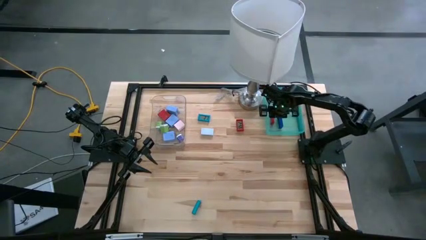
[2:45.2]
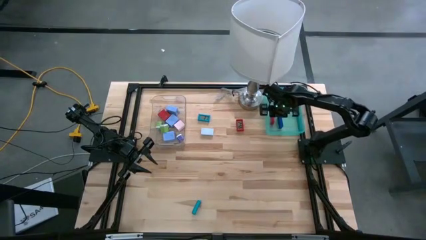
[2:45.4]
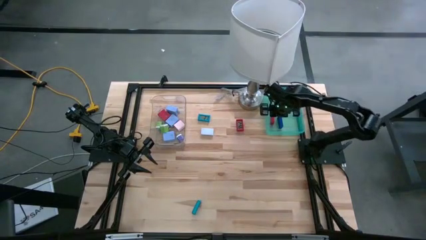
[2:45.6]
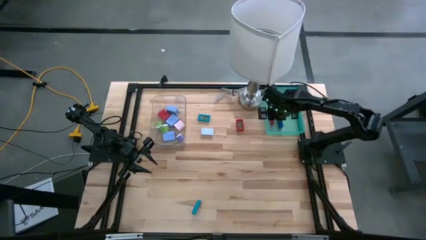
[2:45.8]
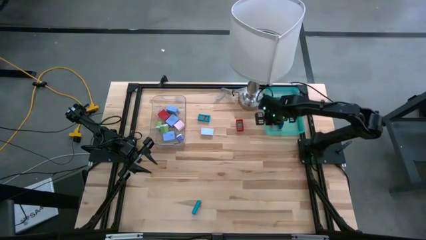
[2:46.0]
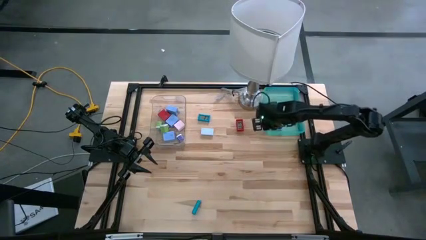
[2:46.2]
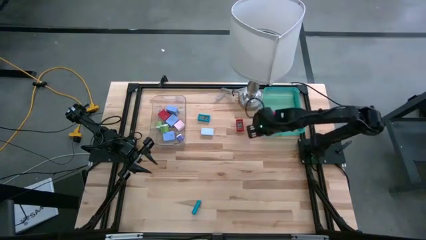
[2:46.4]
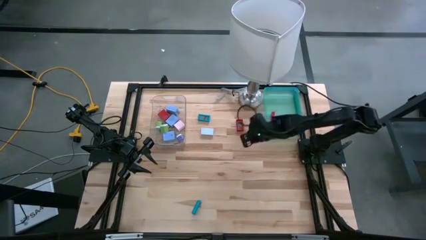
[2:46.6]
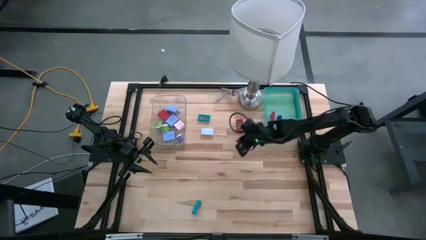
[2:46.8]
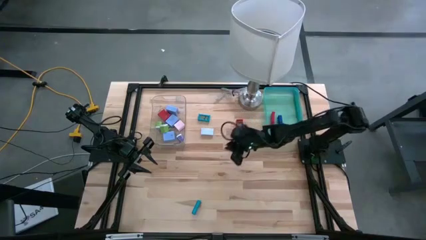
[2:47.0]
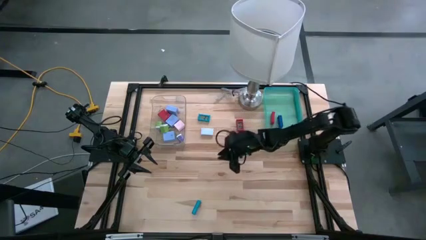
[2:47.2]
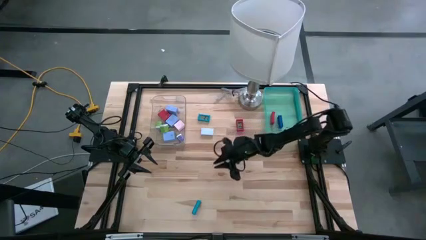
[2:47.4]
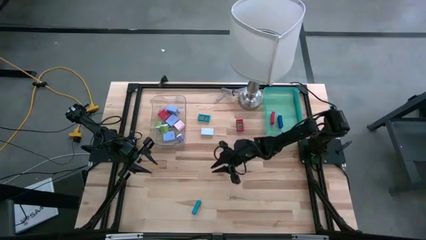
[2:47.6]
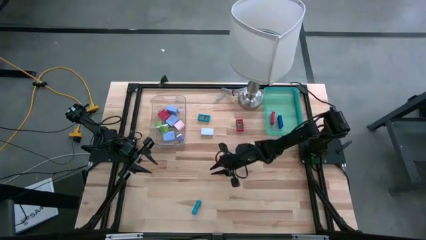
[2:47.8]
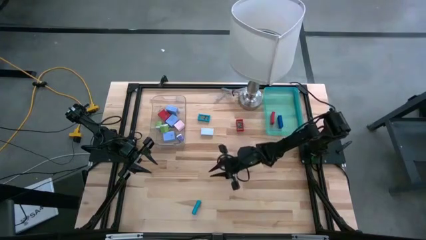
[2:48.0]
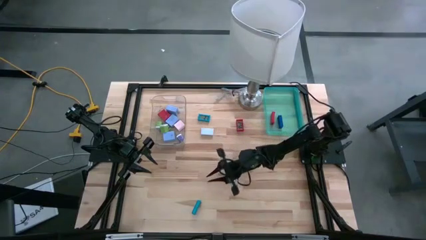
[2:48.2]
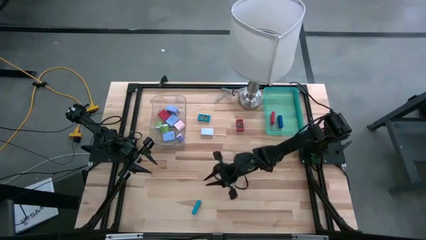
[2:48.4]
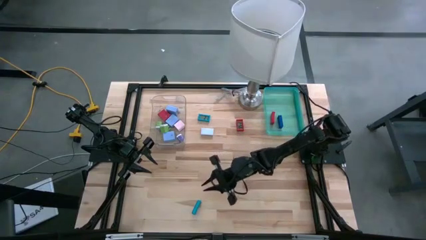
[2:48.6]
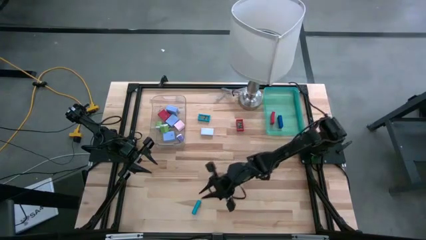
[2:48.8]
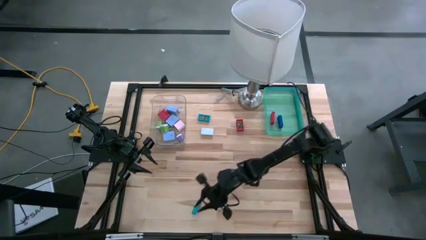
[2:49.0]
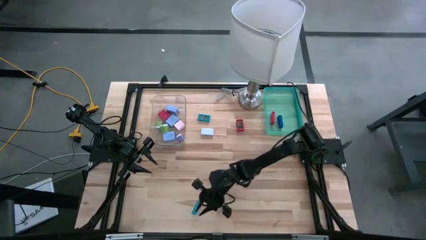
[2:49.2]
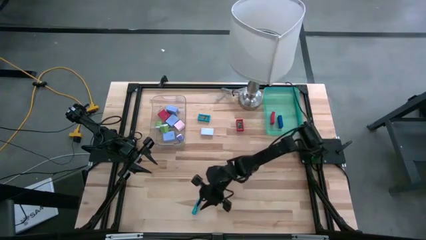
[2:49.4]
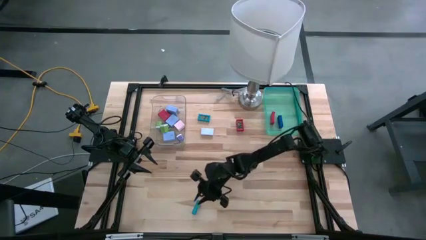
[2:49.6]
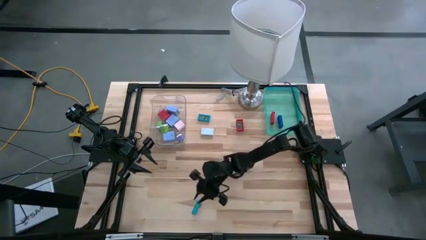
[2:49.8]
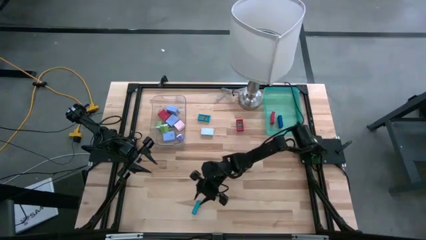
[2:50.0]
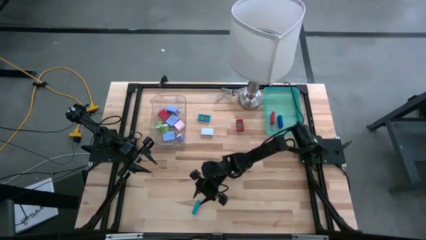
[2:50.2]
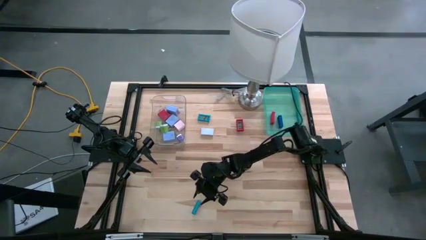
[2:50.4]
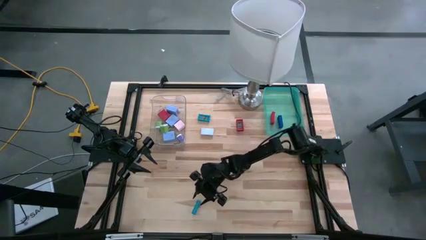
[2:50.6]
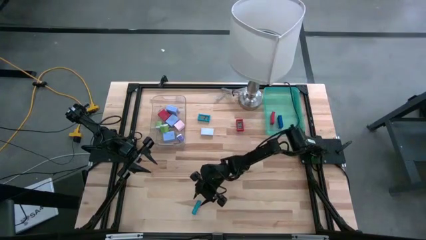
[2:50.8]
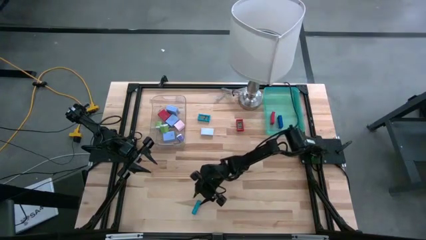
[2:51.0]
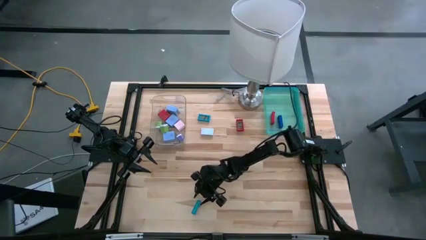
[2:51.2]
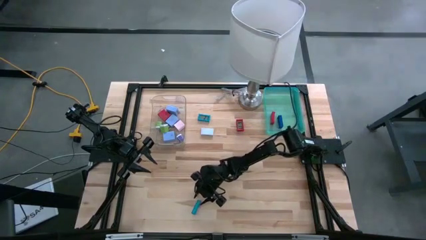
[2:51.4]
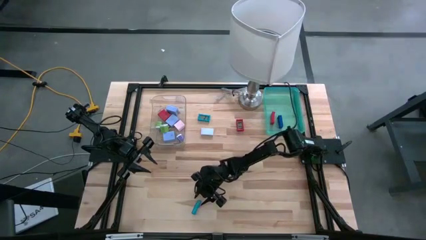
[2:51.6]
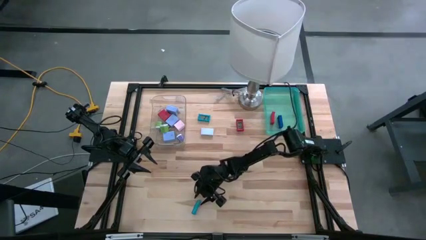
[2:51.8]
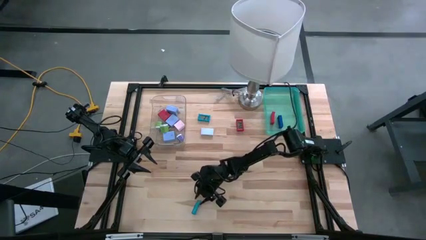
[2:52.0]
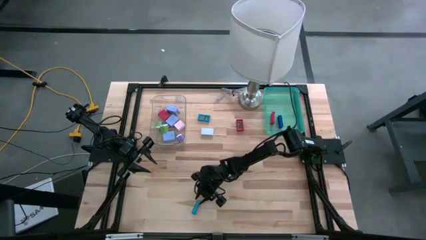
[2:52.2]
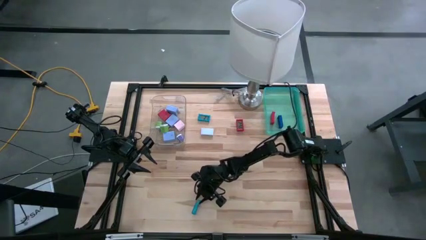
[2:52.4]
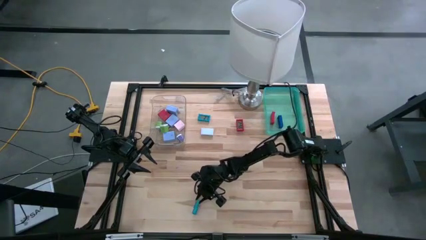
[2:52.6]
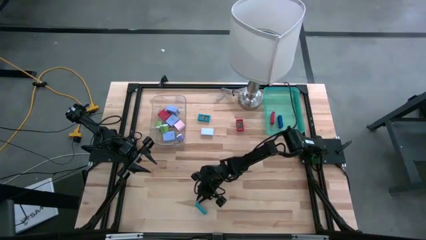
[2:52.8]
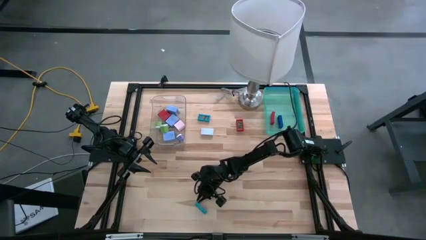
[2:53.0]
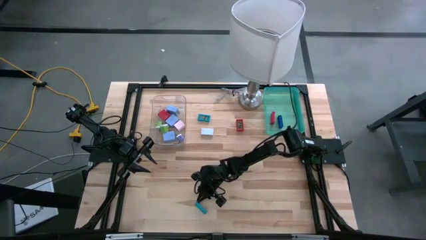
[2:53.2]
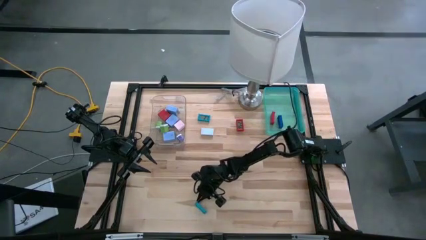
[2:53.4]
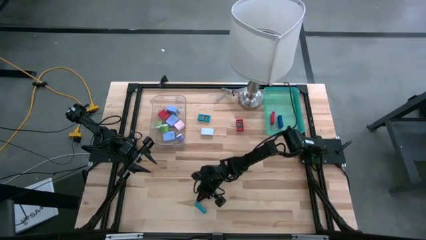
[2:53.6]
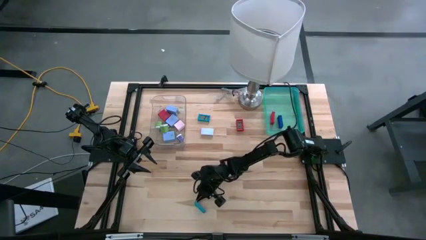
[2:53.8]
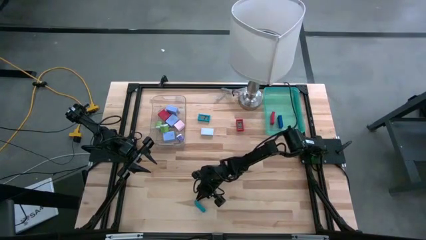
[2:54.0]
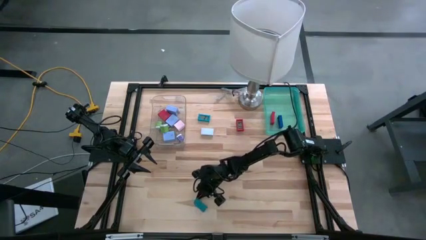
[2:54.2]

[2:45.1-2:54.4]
Task: Pick & Place Office items
Put the bottom light blue mini digital clock into the light blue bin

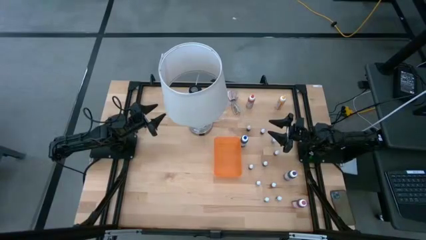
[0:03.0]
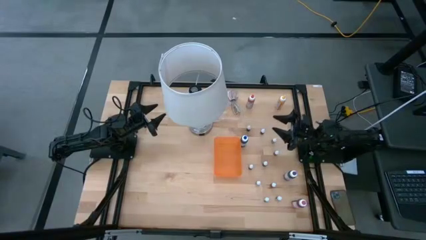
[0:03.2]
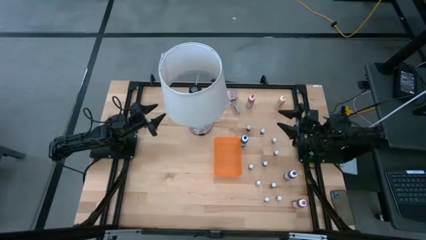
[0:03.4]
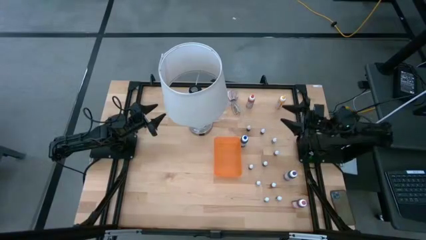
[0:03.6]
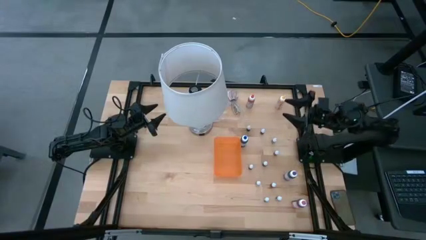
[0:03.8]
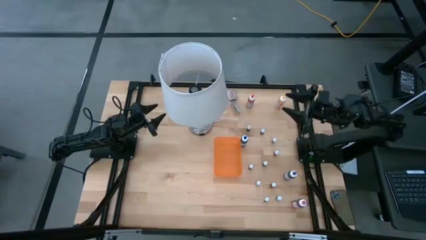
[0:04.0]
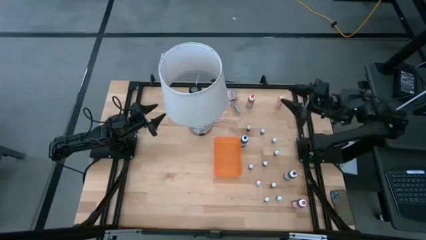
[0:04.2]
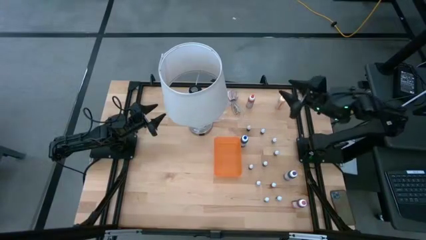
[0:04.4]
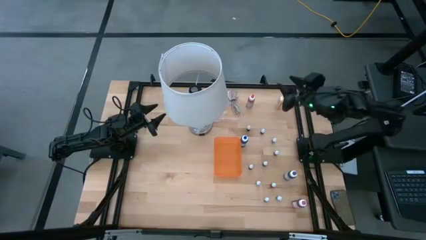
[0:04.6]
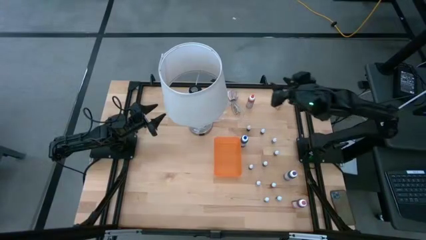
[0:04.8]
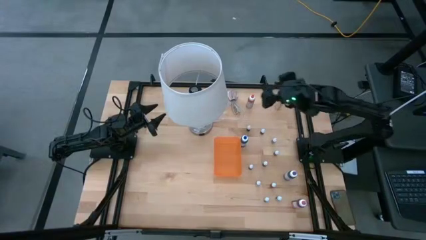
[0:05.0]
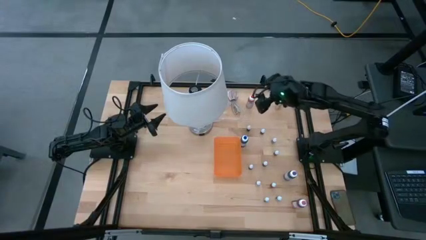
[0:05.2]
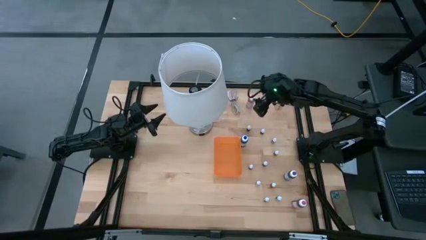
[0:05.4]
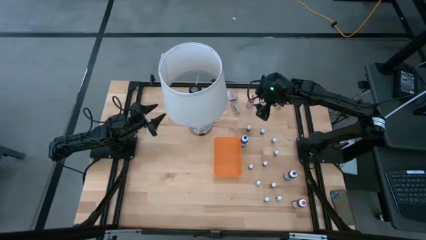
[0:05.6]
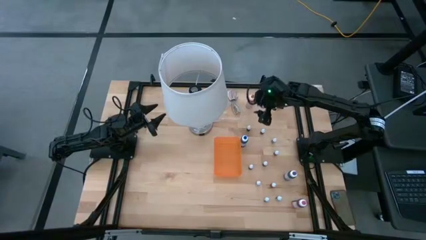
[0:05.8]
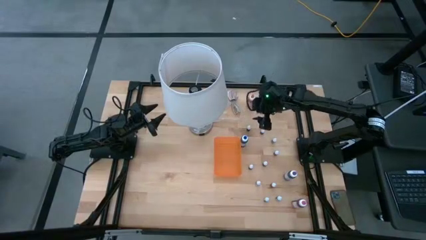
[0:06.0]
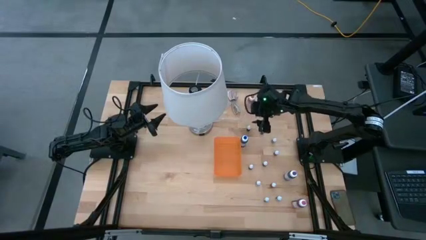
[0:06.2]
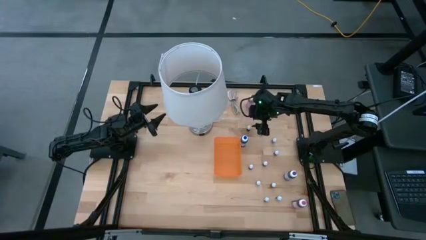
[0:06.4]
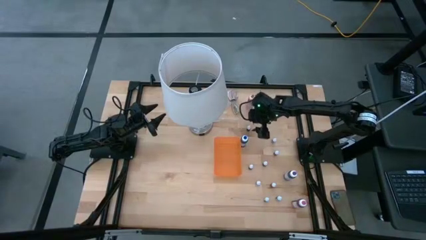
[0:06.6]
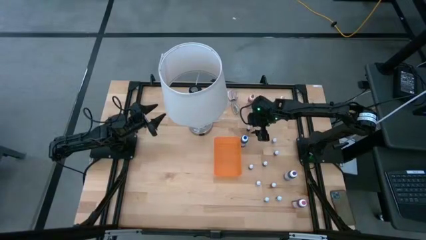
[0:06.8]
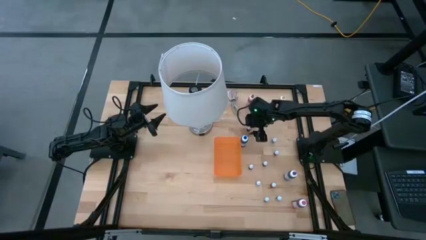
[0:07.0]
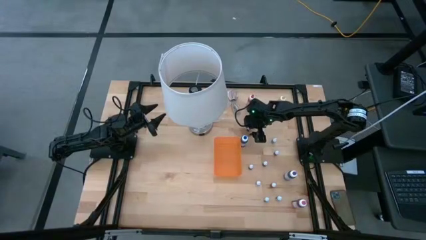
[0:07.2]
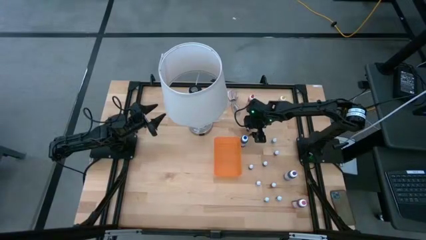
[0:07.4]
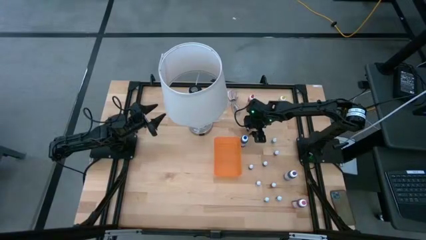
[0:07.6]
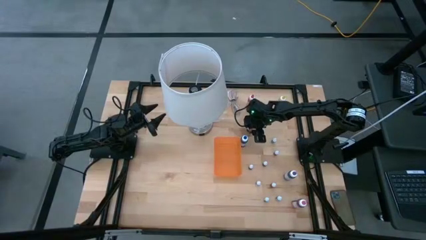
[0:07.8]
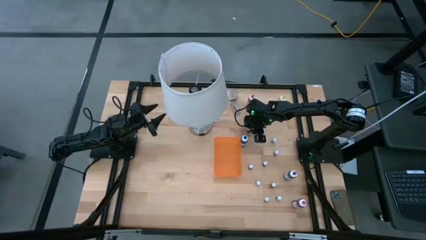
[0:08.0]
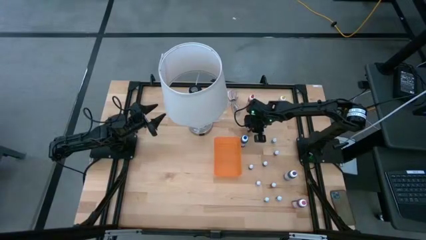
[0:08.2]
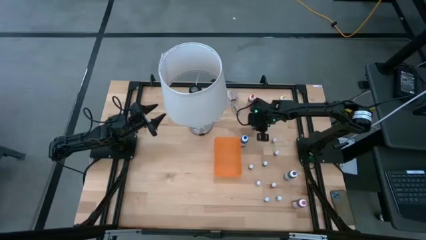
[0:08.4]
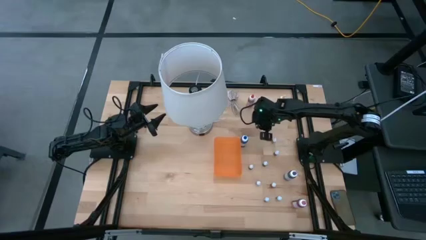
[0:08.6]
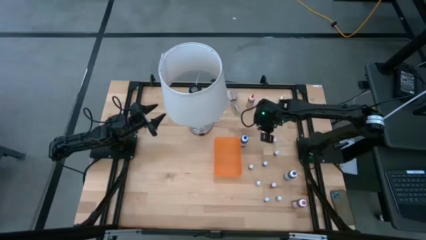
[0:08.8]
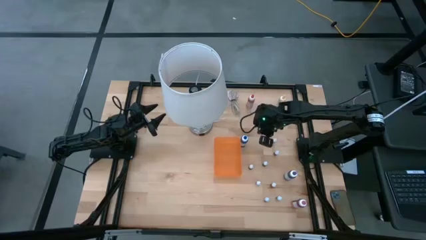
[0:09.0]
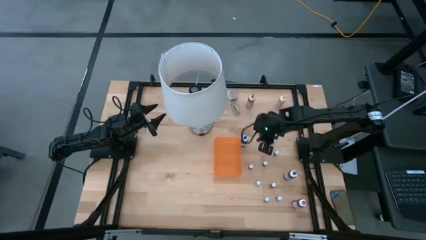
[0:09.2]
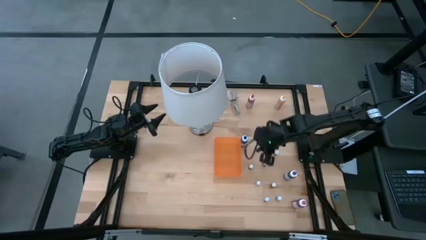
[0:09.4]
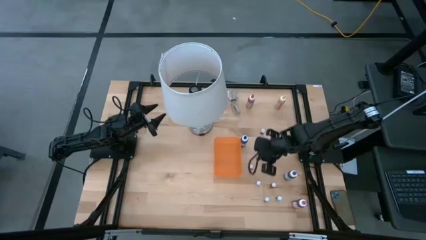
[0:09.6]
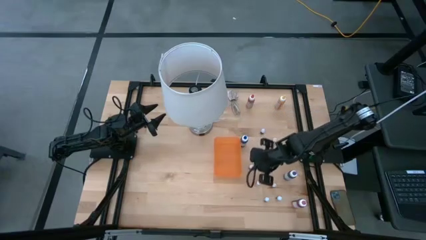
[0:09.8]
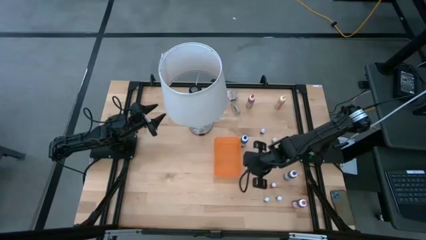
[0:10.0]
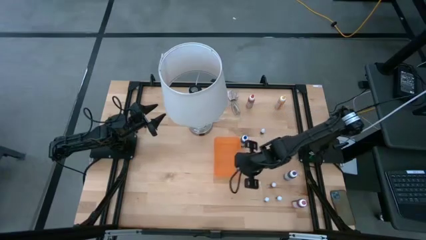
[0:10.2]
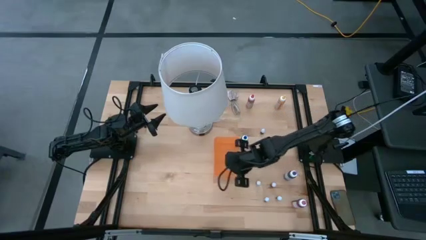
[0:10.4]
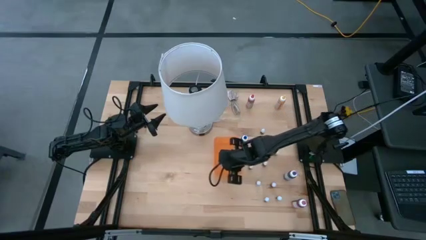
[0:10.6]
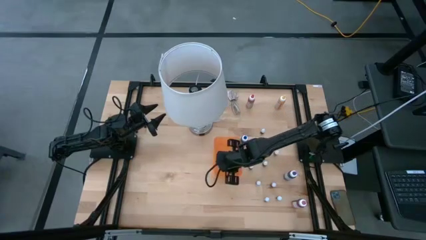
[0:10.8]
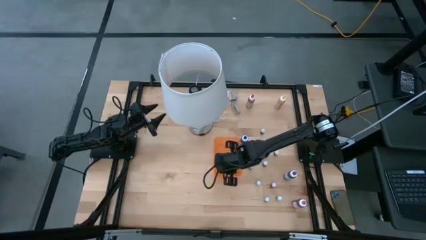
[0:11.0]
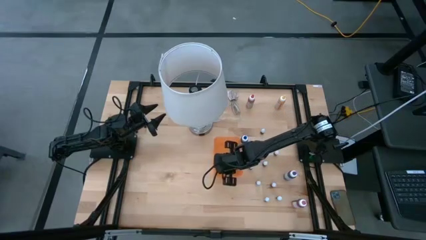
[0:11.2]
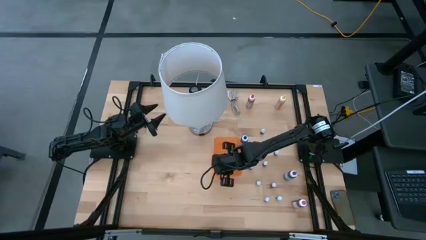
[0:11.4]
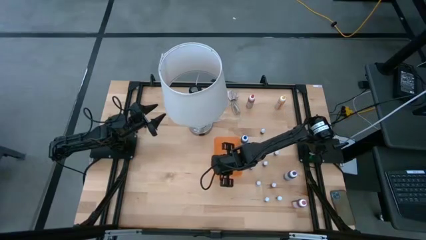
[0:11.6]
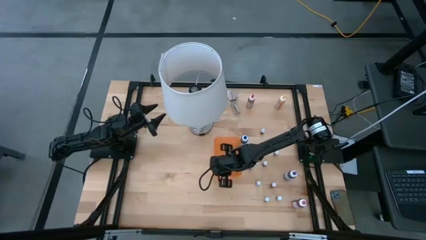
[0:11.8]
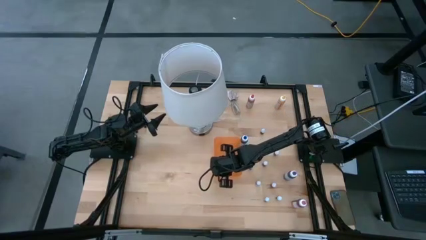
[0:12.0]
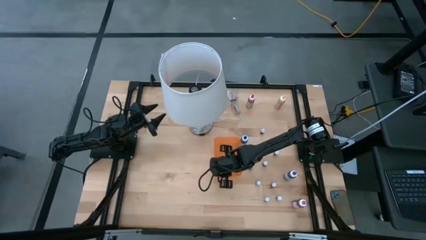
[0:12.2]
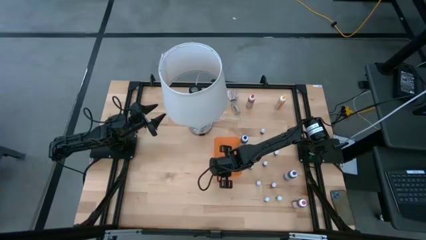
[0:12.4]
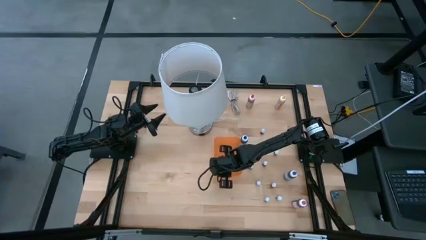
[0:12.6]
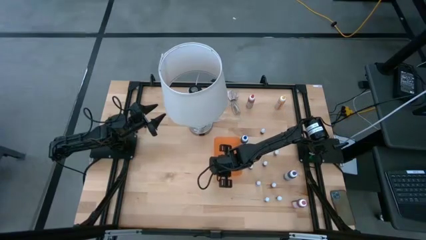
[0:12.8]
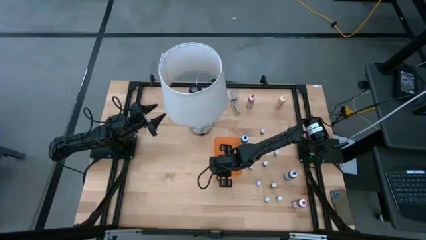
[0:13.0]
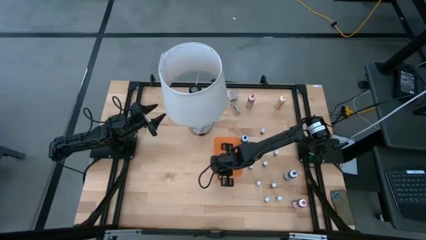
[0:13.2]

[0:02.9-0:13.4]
Task: Pick & Place food coloring
Put the small black food coloring bottle into the orange bin
